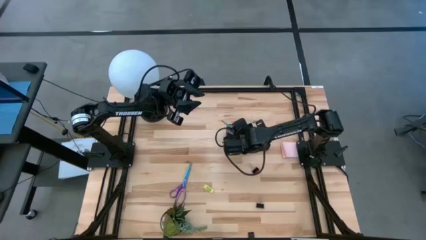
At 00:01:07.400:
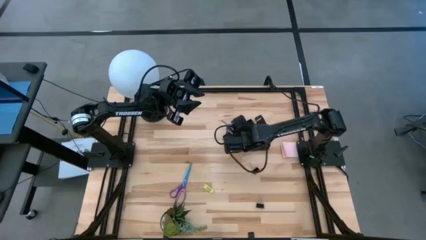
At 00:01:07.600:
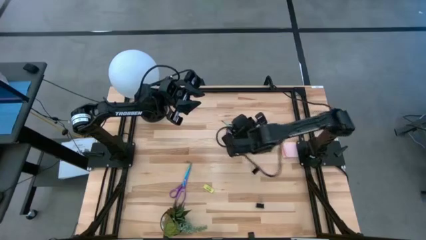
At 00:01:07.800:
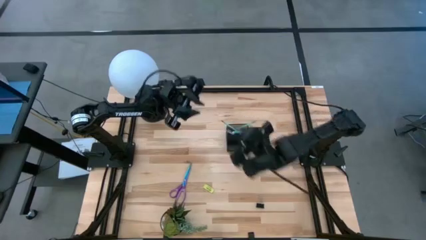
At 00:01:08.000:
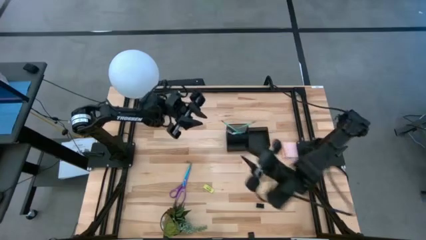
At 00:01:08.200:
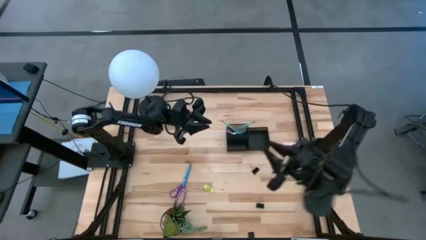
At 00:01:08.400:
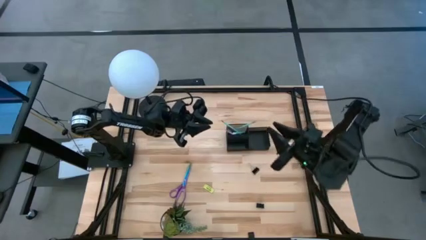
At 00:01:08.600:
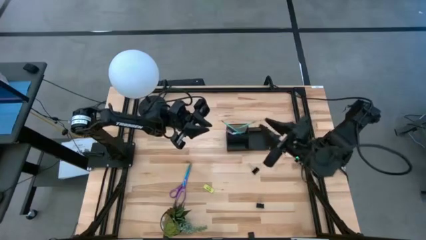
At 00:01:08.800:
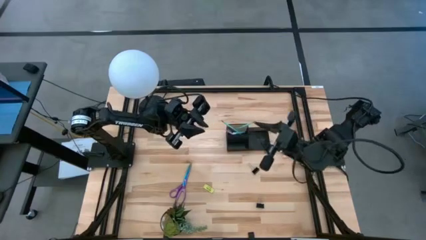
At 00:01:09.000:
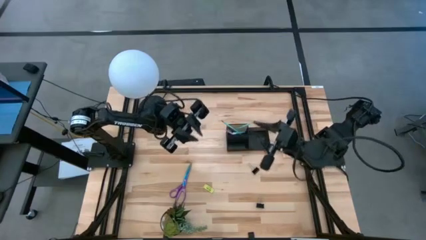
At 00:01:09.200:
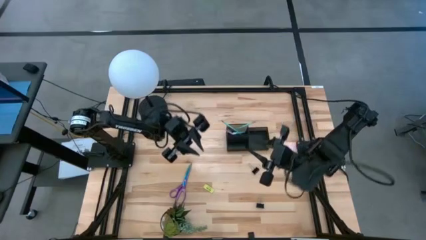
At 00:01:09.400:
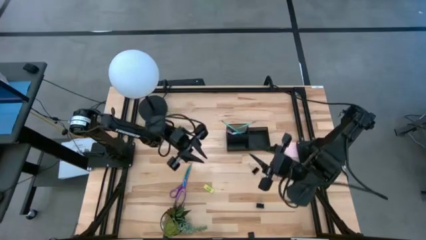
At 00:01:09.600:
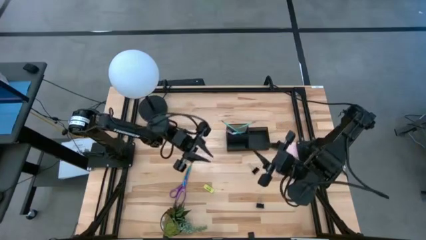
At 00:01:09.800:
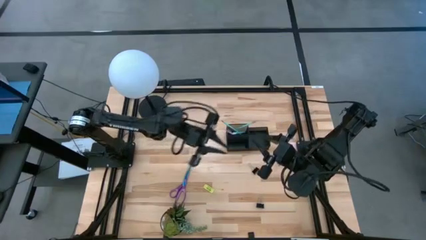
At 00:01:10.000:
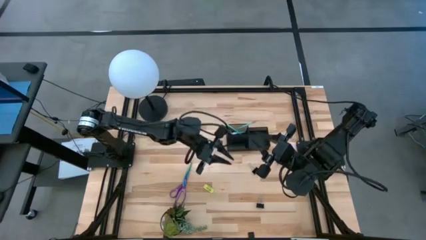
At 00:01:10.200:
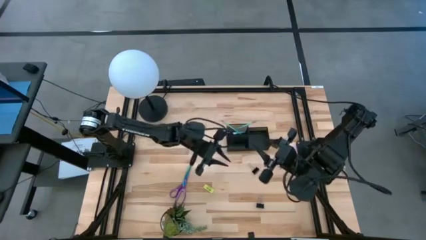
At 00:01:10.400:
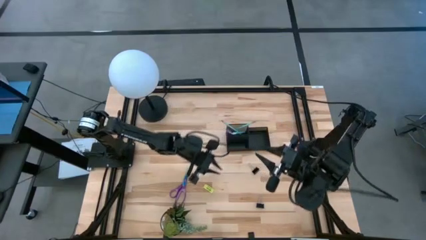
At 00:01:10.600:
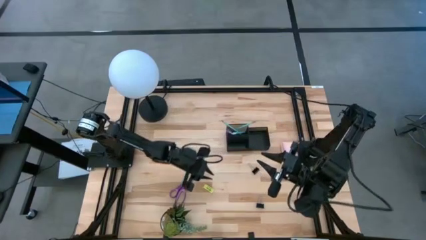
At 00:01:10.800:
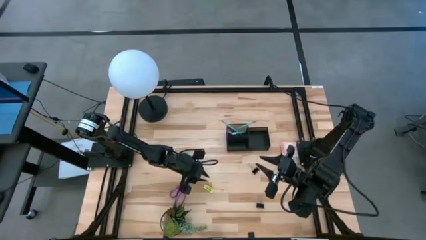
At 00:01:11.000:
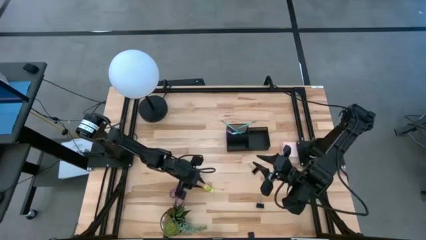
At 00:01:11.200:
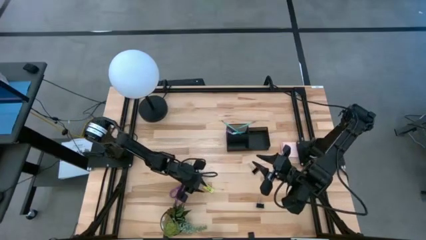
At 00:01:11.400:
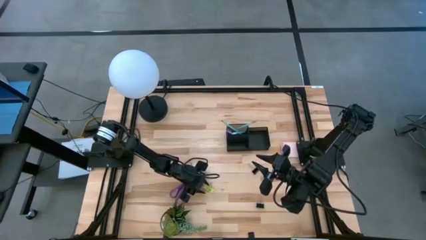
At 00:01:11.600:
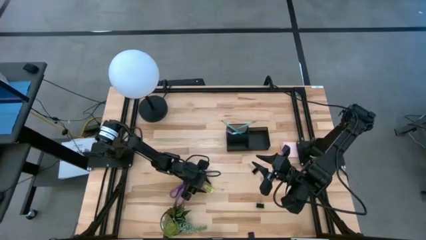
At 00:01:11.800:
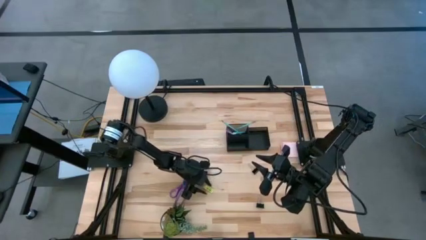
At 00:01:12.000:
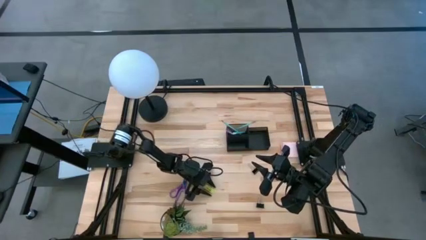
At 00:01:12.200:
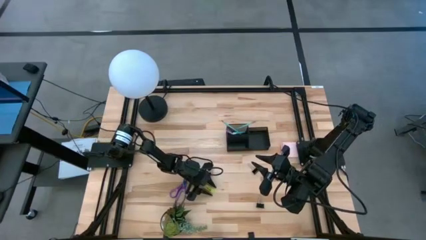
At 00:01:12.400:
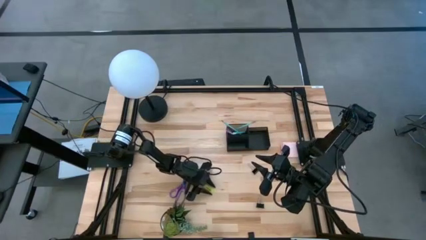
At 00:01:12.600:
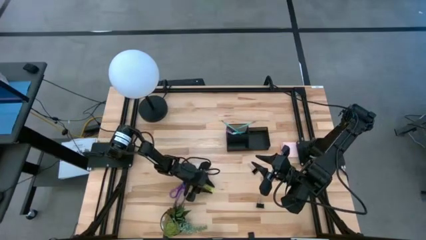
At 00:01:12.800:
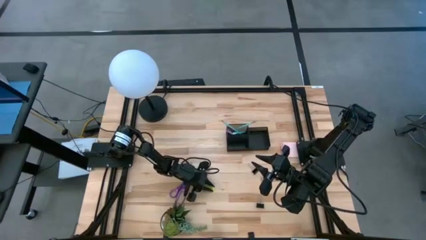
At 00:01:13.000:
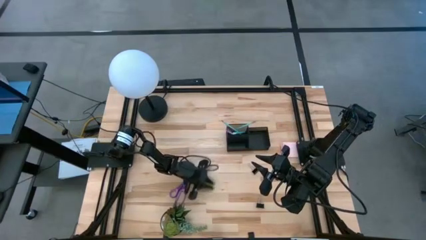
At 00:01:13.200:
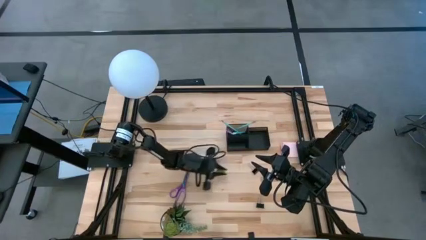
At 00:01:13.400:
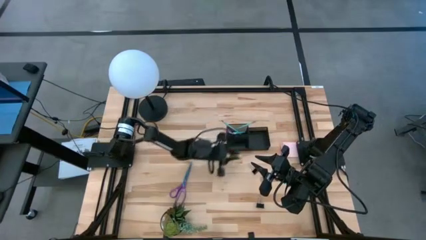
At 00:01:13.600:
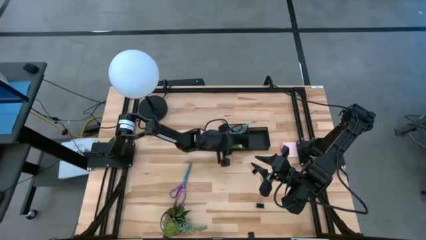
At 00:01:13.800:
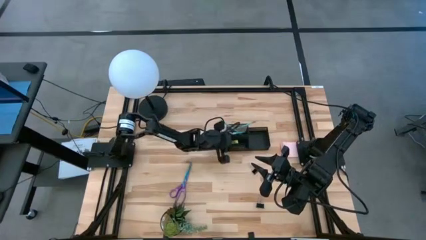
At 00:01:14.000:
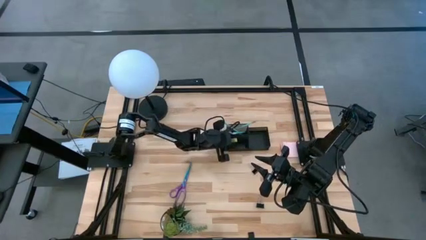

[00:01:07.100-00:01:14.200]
Task: Pick and place office supplies into organizer
Put the green eraser into the black desk organizer

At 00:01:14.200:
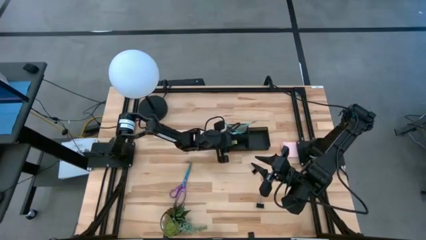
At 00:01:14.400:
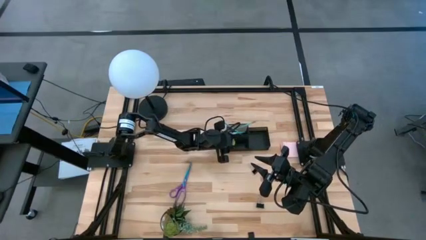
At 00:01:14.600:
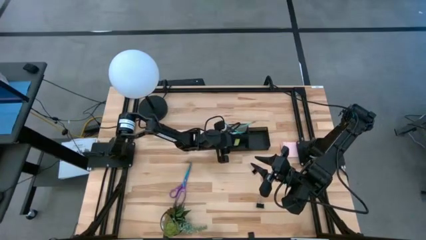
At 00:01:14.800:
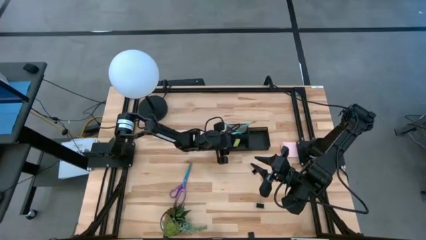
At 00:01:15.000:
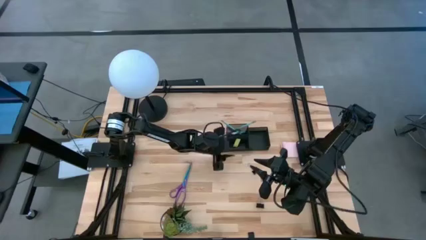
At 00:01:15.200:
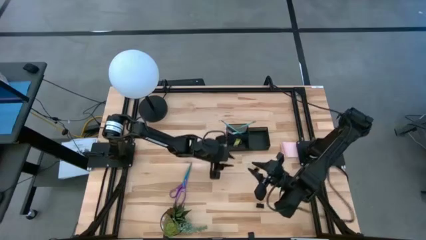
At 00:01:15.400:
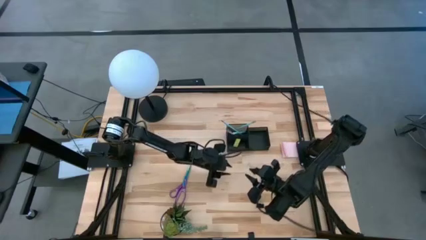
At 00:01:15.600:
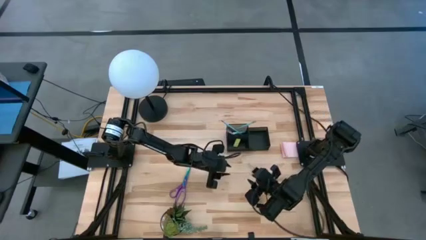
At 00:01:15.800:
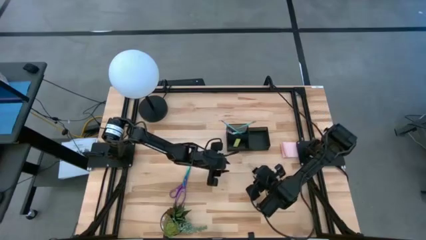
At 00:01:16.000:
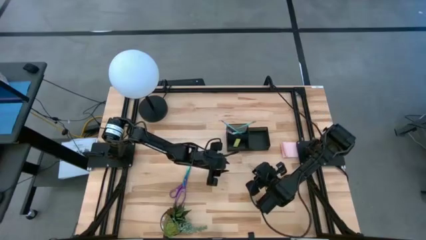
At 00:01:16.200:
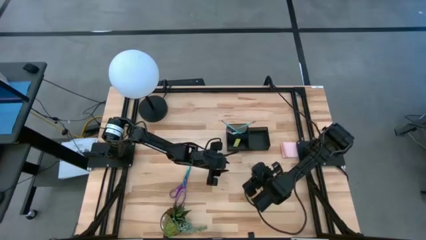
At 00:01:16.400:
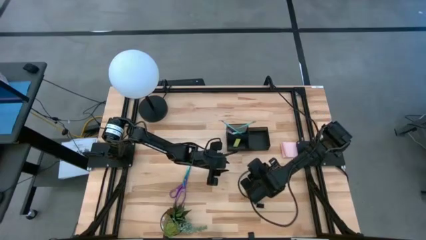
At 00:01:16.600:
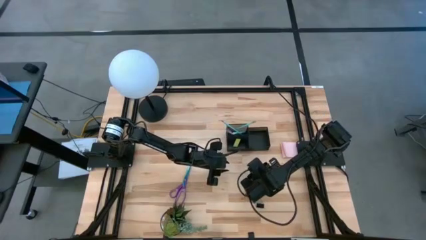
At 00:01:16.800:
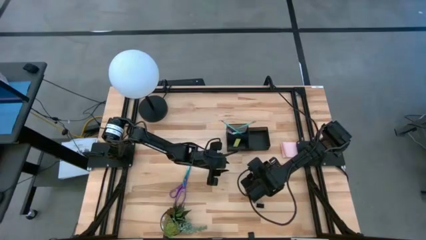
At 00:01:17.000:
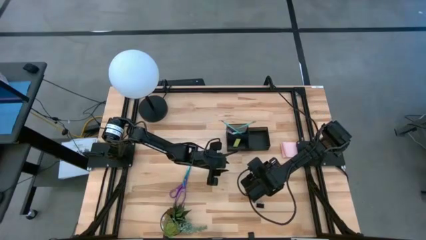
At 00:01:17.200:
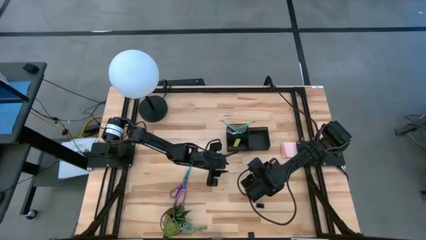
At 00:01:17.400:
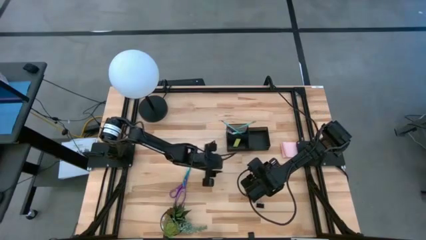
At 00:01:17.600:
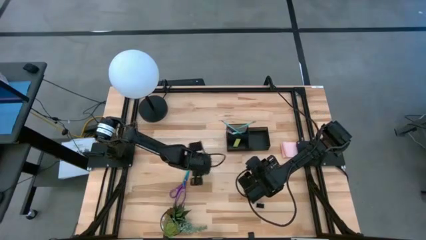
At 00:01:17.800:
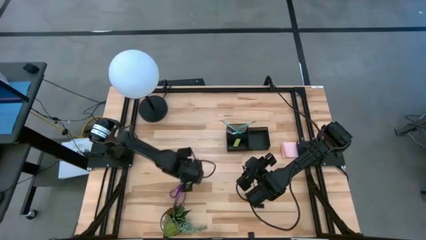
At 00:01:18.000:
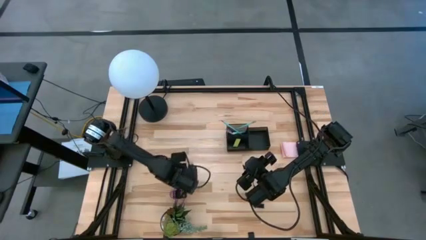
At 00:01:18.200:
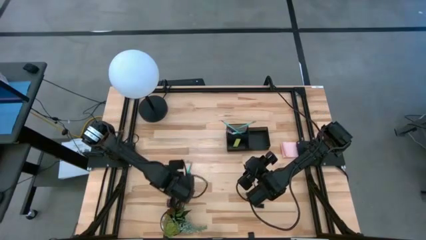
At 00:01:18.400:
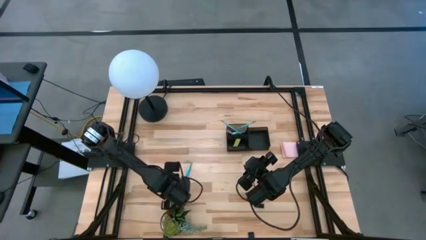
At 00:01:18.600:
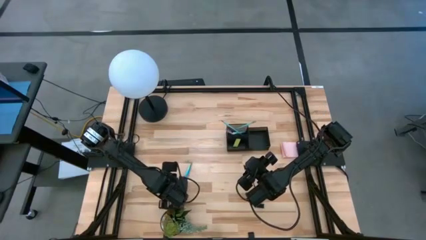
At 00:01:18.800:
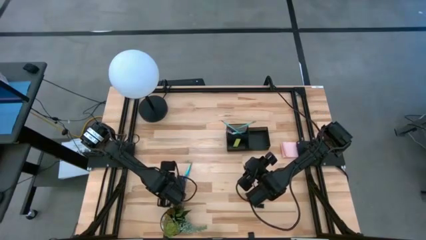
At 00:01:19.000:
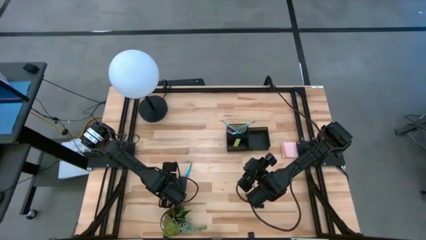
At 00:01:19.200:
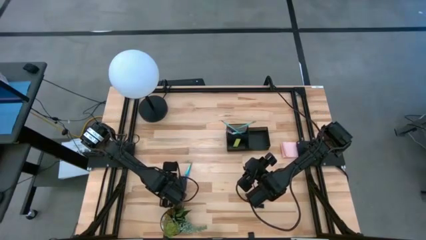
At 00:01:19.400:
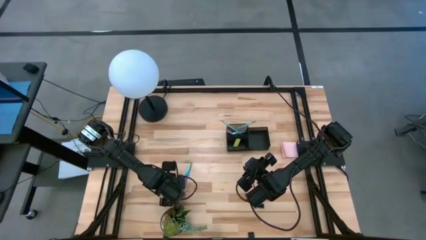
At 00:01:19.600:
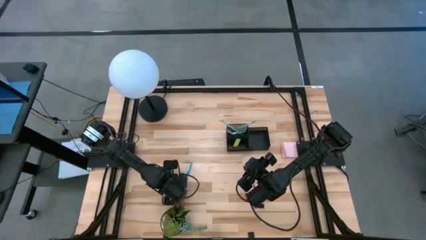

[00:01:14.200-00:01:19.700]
Put the violet scissors into the black desk organizer
